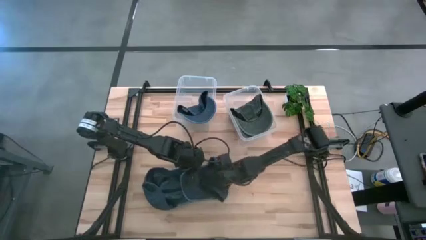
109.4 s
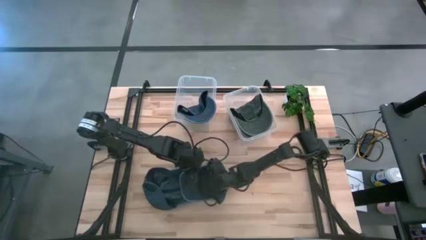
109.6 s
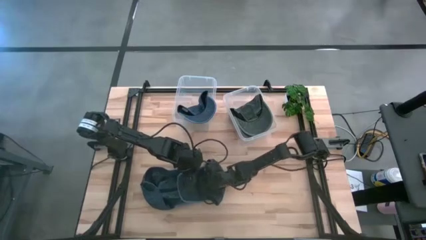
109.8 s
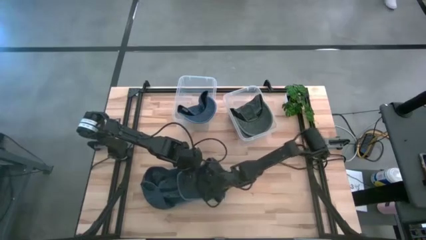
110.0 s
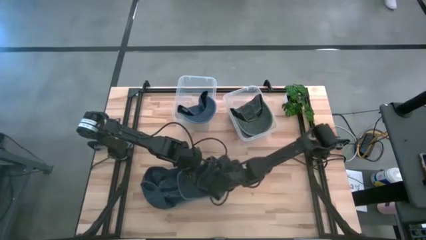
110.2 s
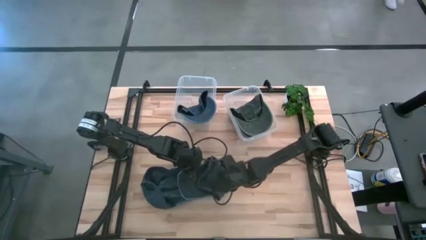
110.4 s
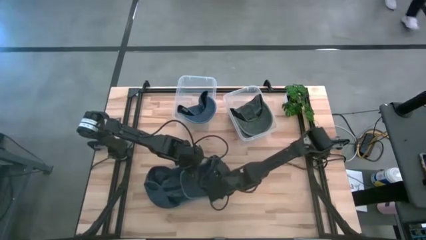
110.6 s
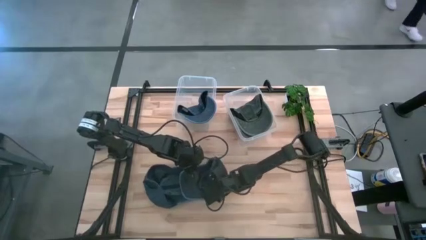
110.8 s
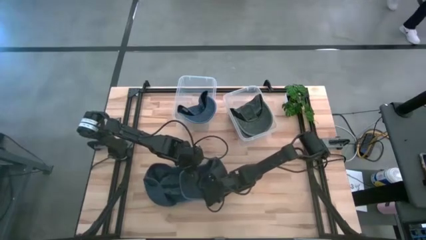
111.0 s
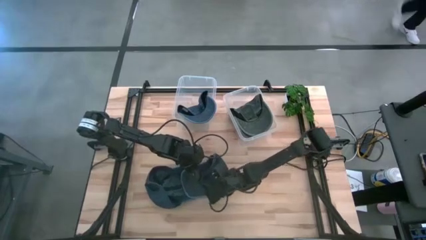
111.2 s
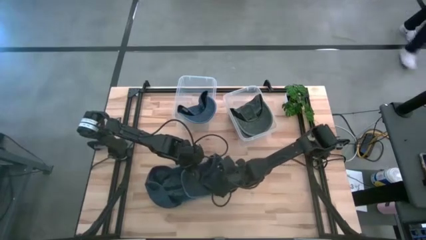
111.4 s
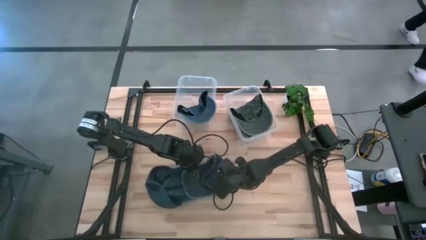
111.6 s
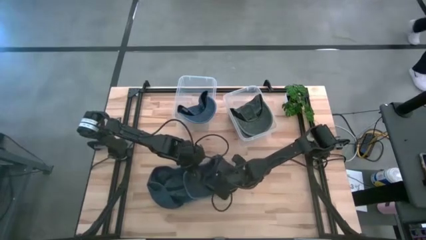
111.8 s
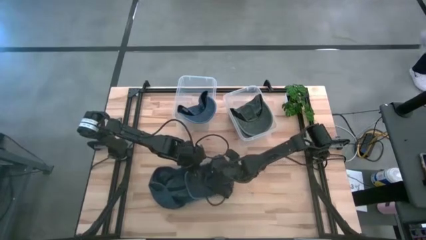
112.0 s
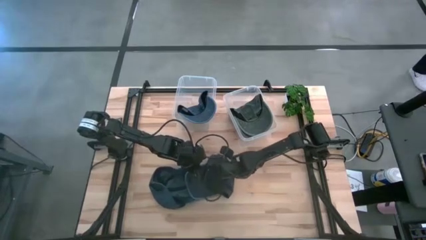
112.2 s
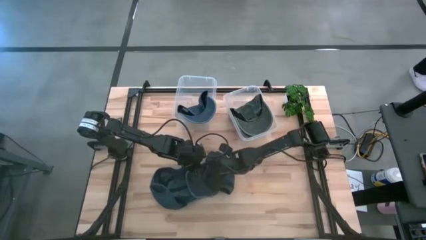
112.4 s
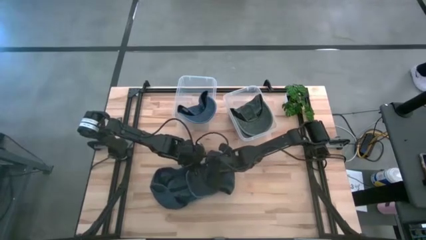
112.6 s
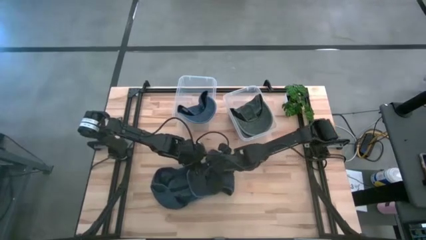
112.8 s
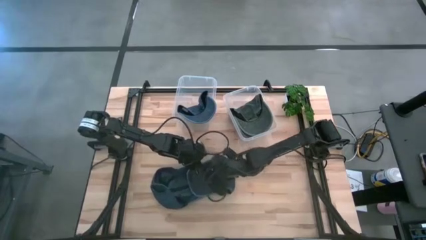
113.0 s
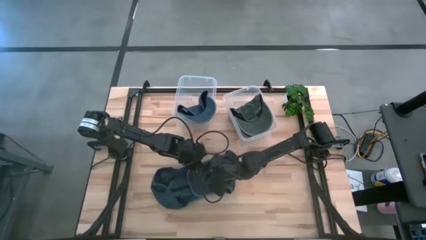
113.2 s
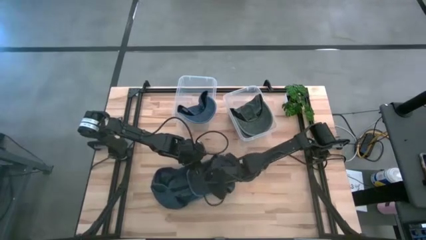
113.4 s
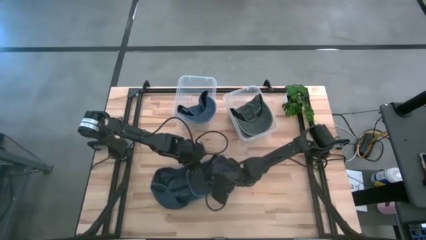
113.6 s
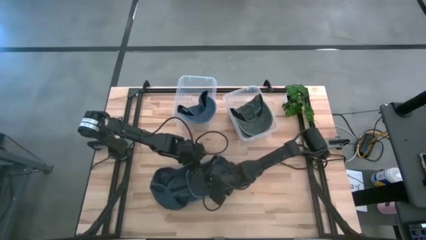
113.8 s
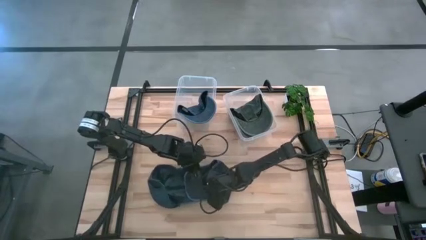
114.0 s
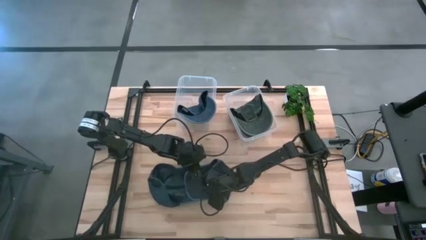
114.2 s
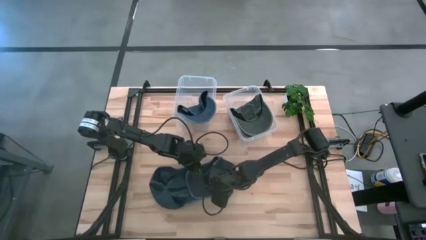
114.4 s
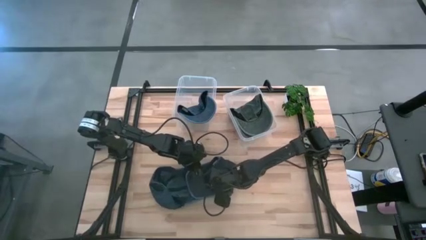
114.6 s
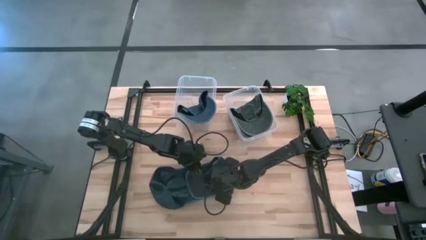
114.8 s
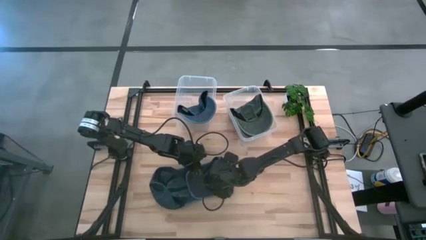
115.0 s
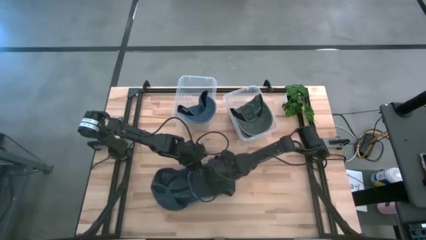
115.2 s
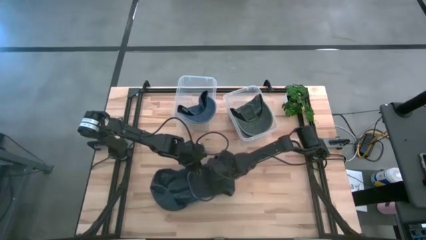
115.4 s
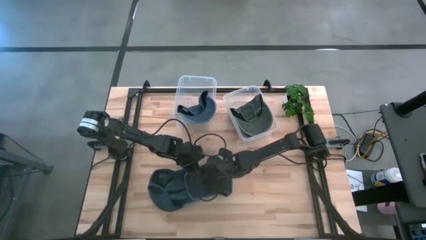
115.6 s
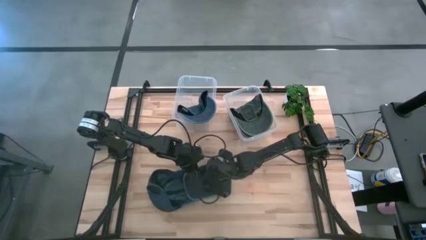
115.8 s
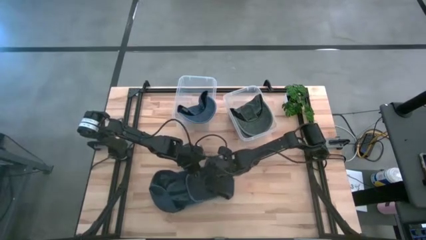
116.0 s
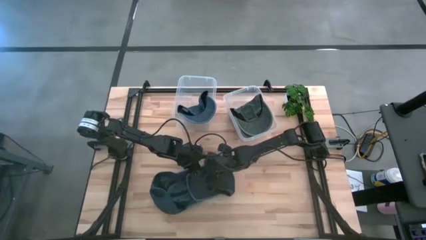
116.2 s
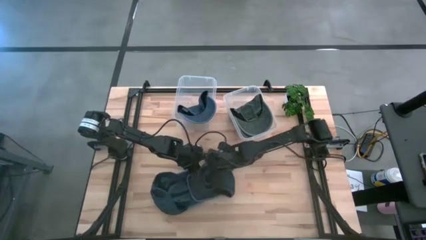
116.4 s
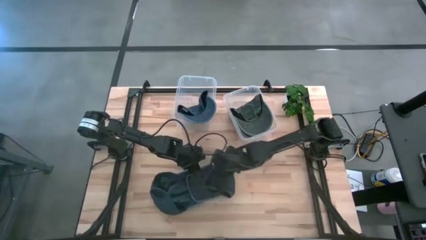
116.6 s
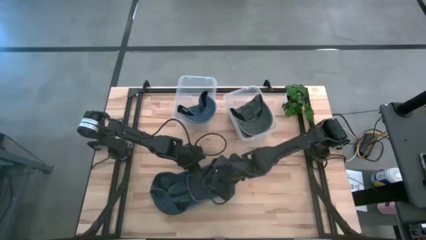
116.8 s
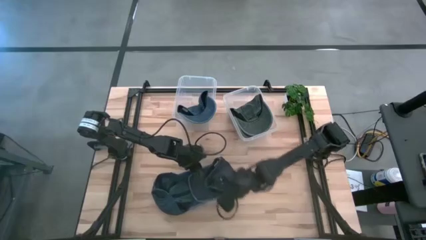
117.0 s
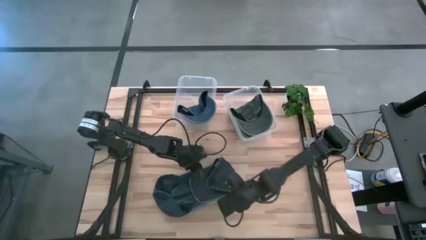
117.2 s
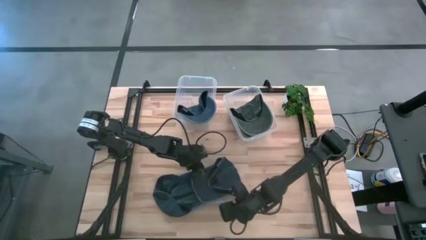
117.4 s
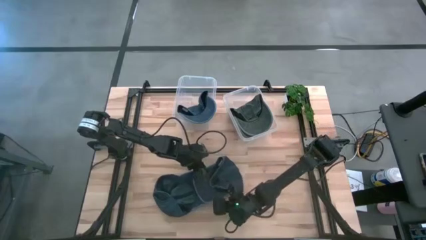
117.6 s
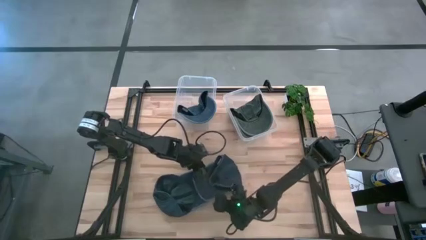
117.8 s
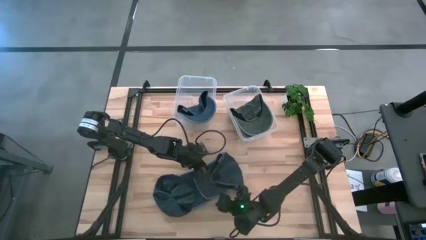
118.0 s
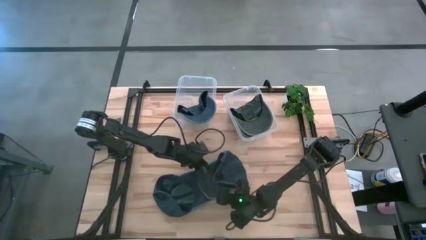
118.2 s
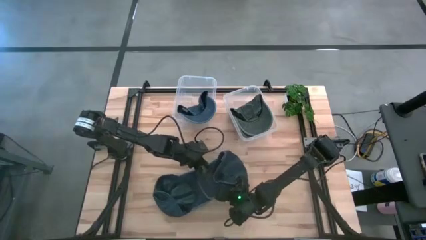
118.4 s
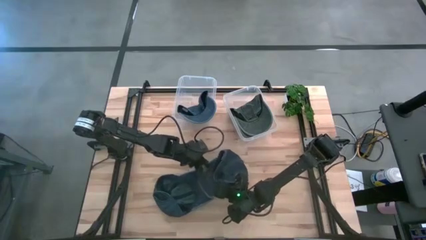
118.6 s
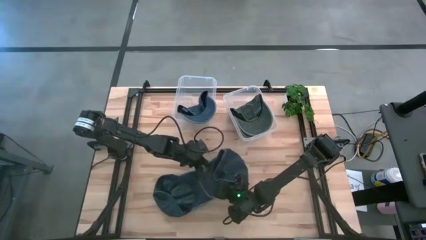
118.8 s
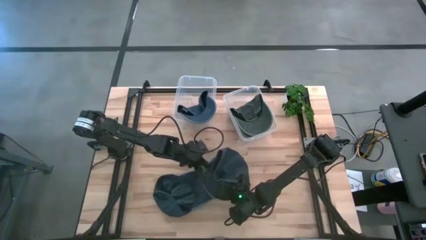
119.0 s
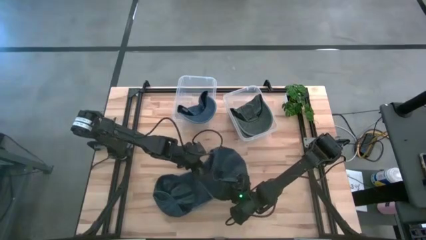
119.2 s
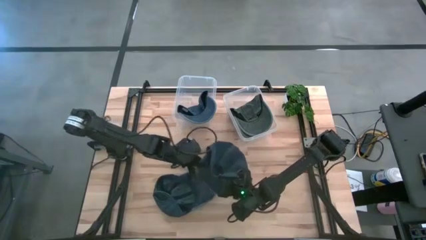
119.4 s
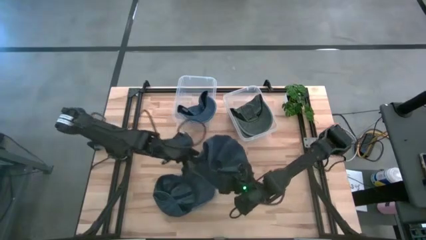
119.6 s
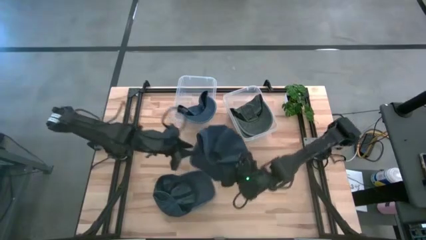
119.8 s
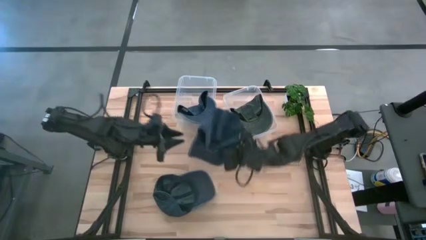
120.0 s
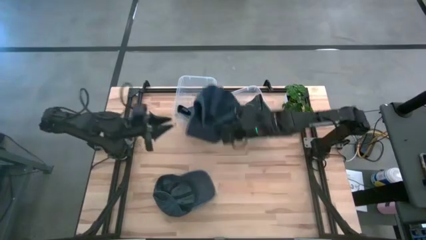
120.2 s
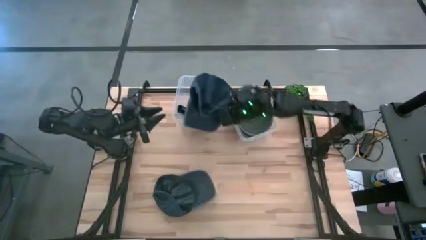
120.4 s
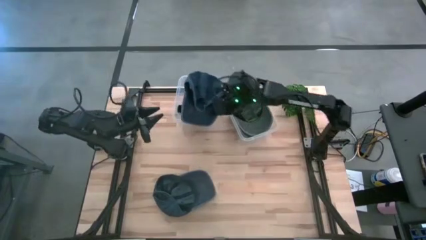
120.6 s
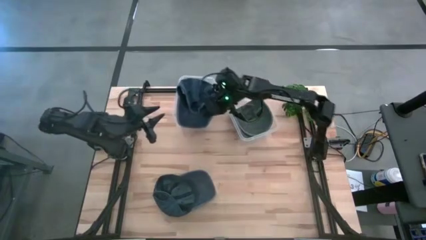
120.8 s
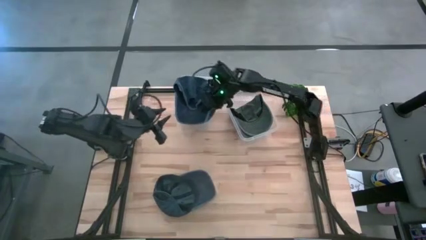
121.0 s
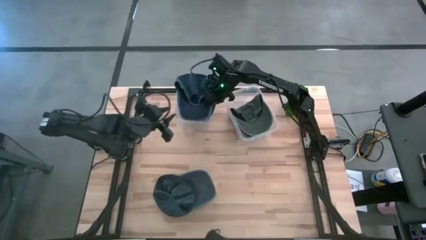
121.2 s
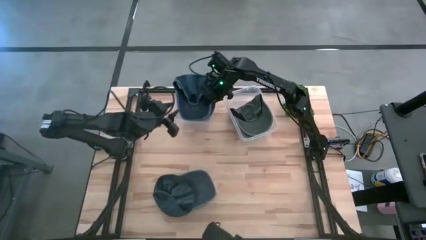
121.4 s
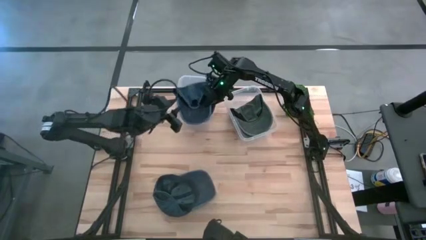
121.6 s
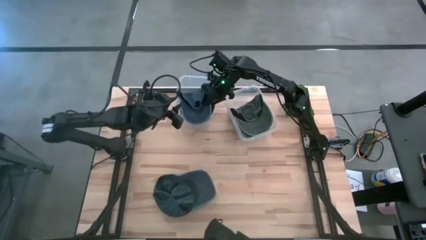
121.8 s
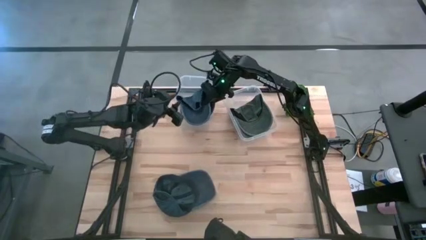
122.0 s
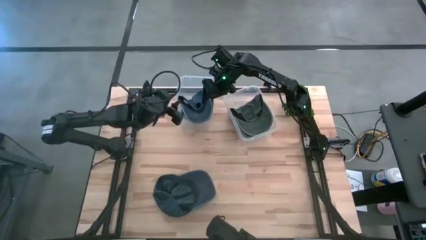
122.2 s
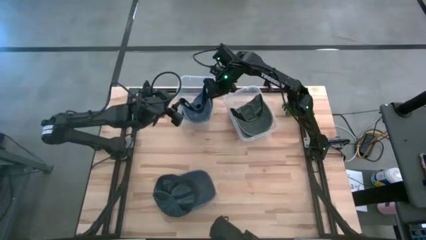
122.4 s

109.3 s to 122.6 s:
Task: Pick & Place hat
Put the right blue cap into the left bin

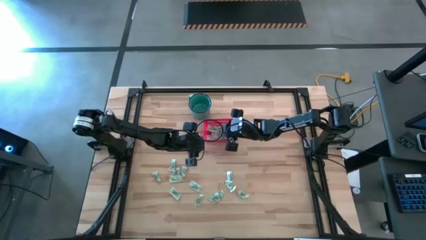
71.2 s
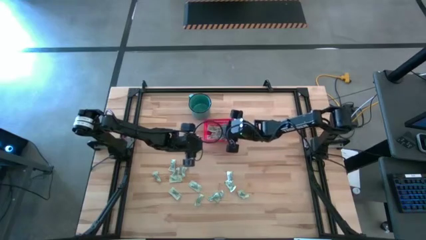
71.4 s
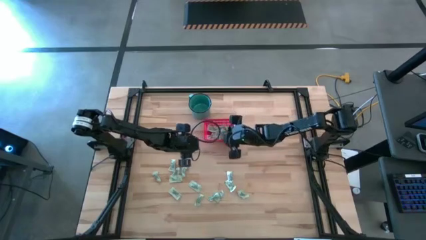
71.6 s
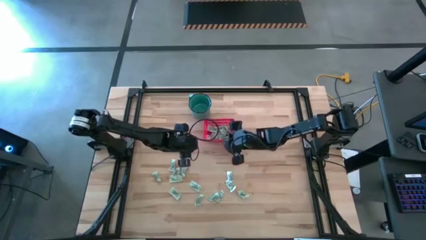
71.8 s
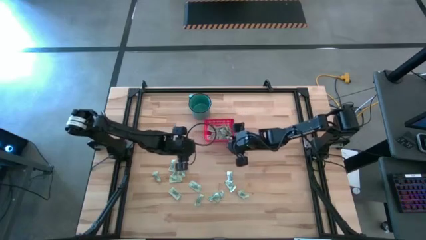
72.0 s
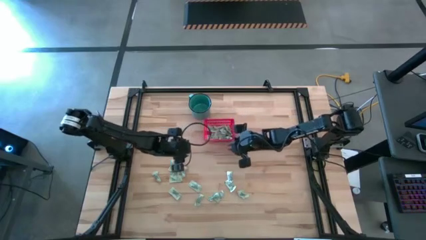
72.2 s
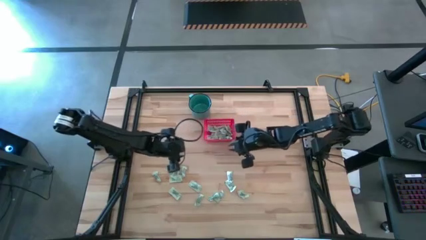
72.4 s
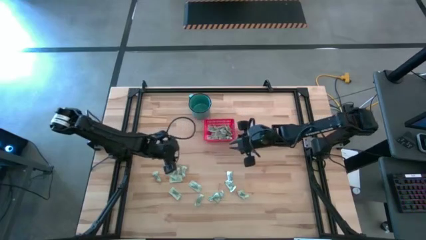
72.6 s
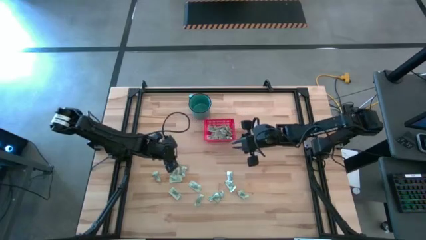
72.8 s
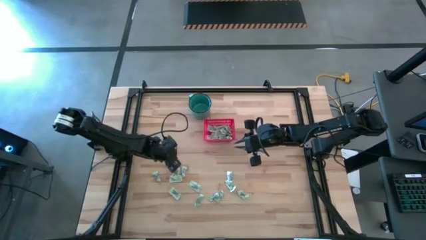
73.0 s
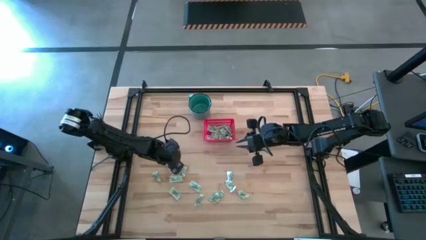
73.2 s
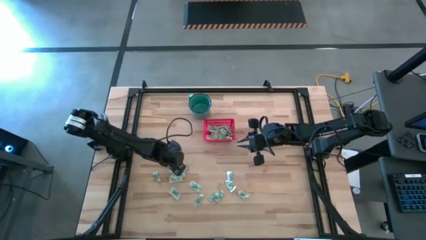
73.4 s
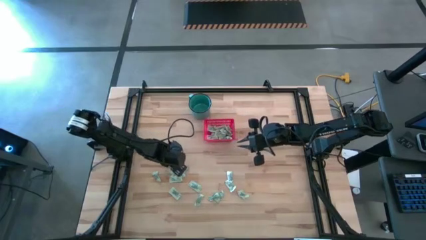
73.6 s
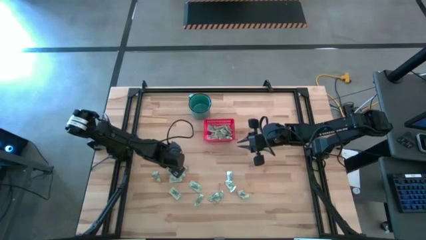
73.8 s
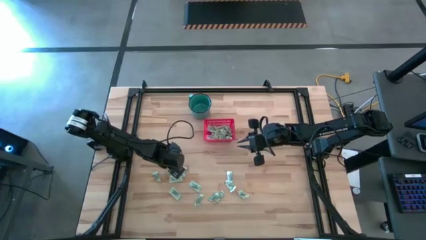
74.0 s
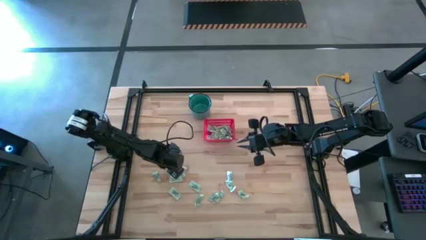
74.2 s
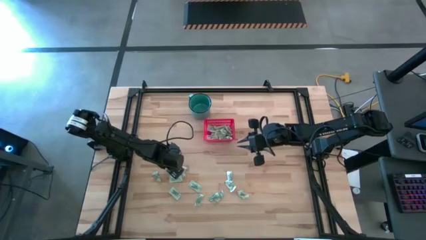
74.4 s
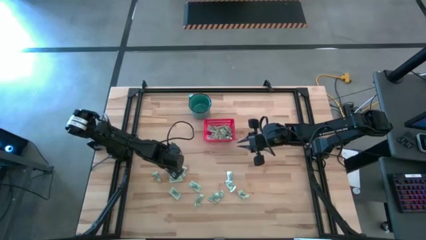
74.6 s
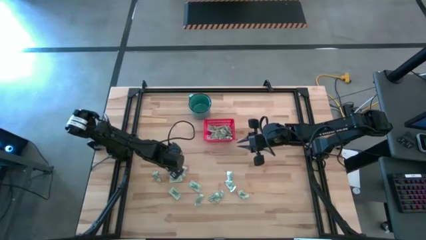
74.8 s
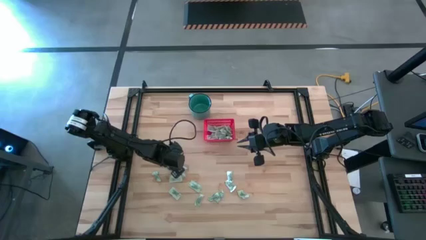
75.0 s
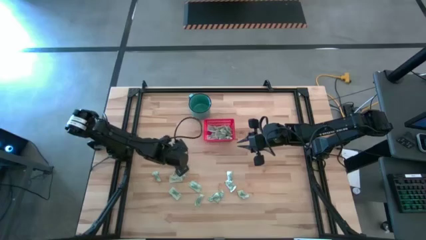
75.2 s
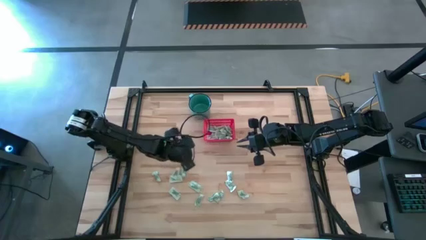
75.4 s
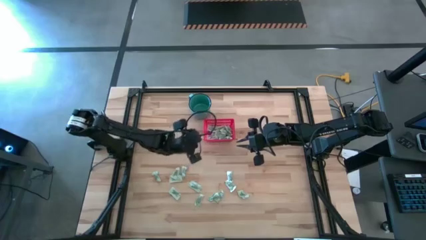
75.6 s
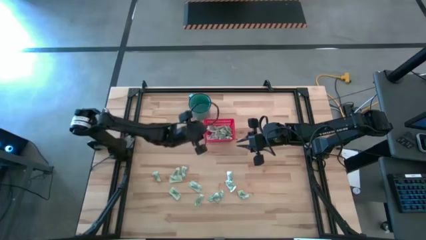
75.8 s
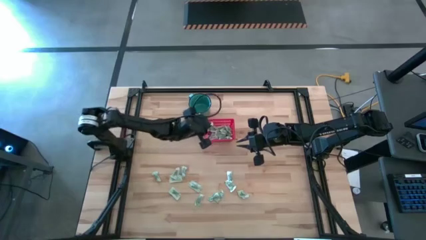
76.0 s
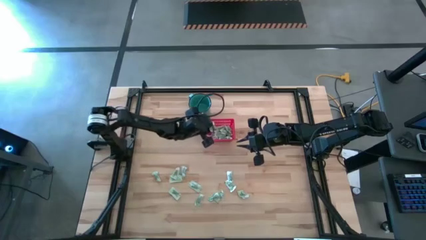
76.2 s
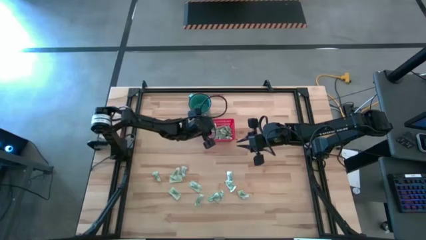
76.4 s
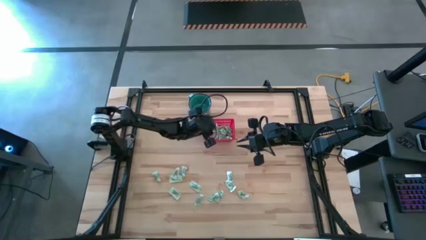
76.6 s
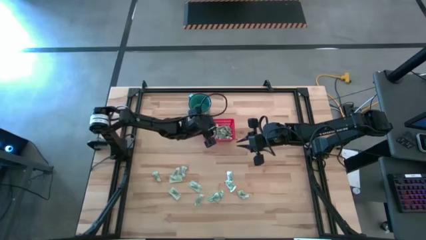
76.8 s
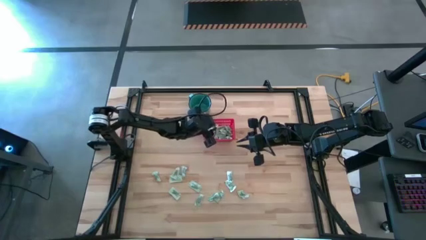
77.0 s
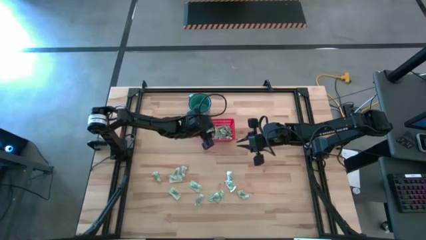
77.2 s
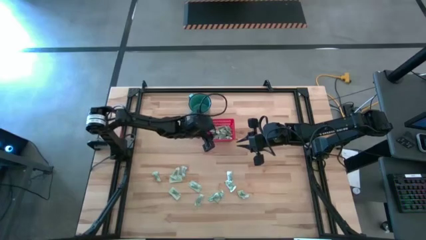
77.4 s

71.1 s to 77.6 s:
Task: Pick and place items into bin
Put the light green stevia packet into the red bin
